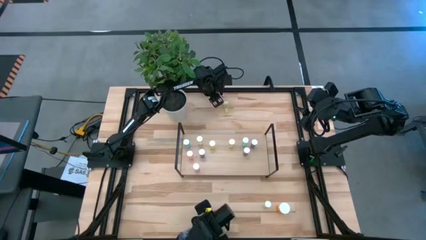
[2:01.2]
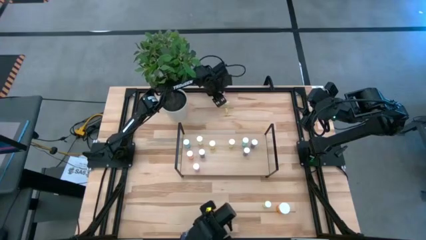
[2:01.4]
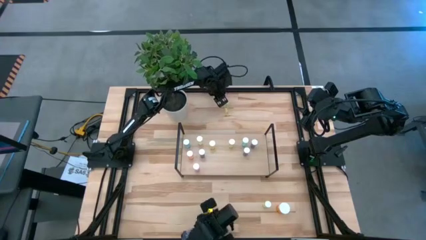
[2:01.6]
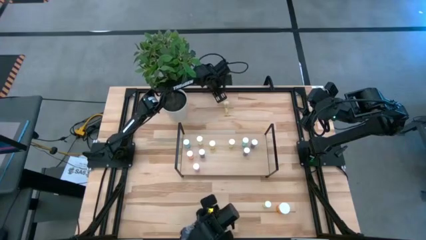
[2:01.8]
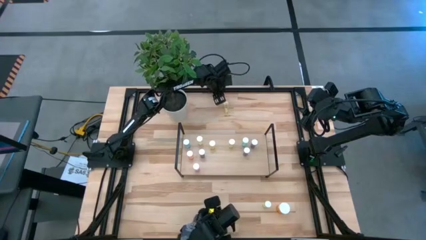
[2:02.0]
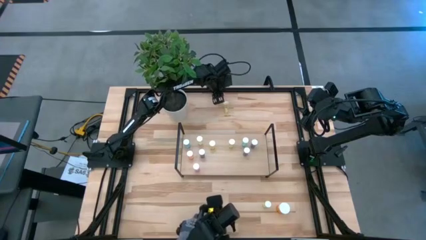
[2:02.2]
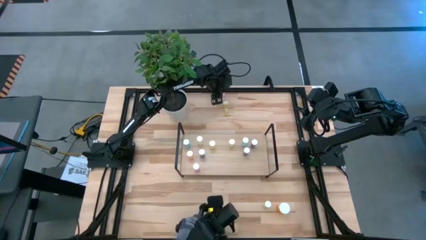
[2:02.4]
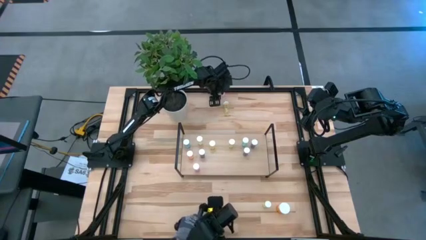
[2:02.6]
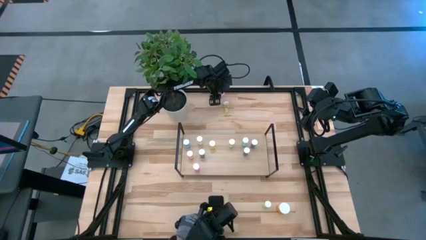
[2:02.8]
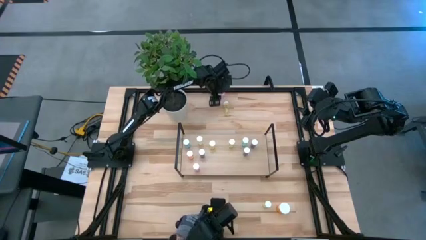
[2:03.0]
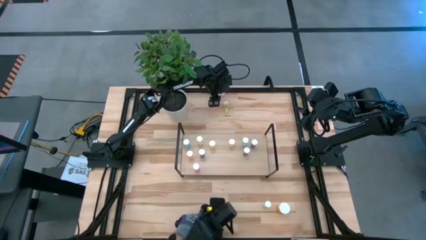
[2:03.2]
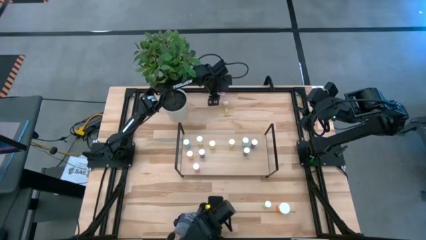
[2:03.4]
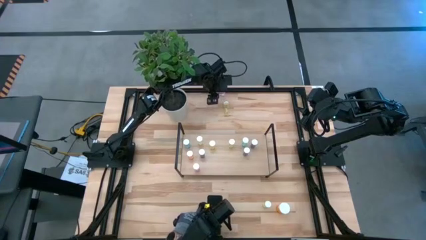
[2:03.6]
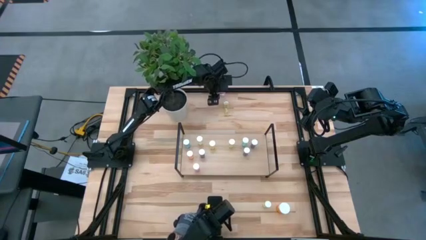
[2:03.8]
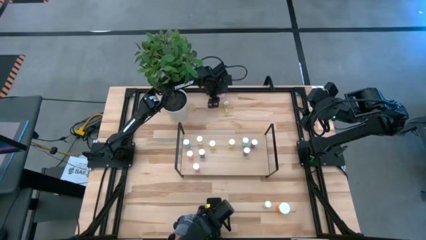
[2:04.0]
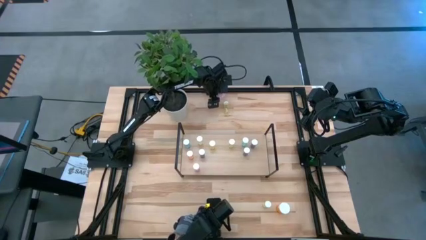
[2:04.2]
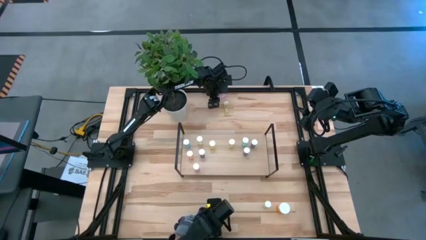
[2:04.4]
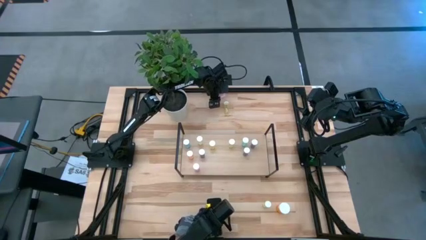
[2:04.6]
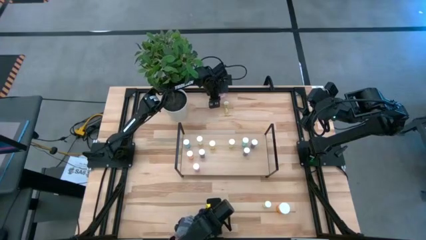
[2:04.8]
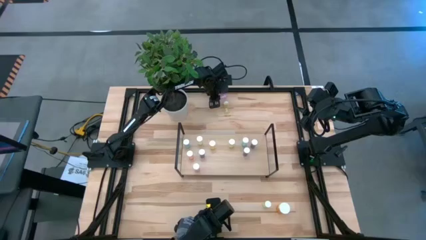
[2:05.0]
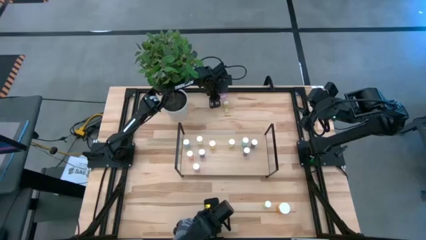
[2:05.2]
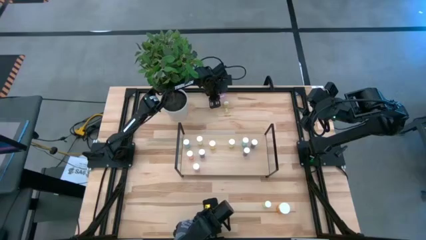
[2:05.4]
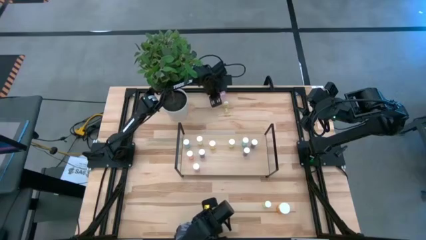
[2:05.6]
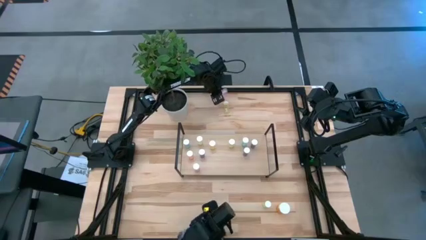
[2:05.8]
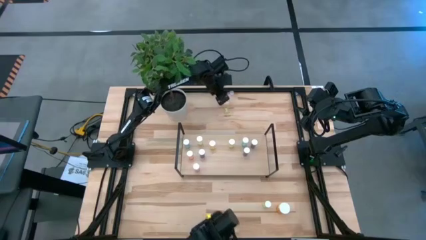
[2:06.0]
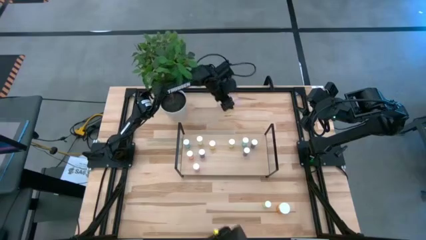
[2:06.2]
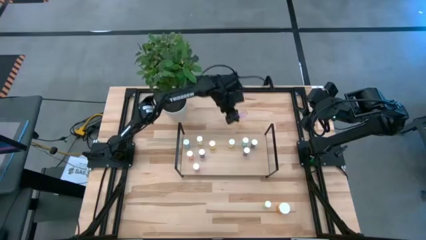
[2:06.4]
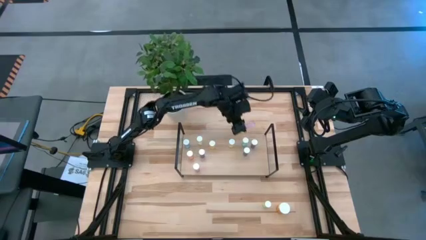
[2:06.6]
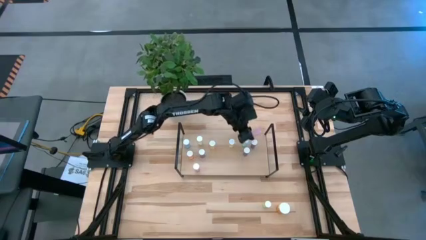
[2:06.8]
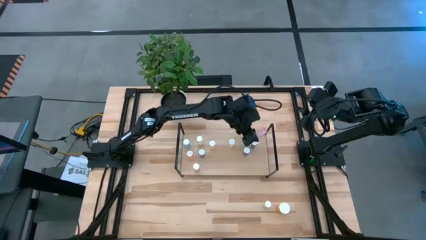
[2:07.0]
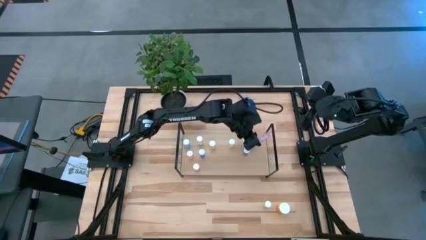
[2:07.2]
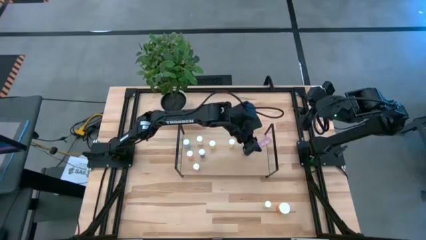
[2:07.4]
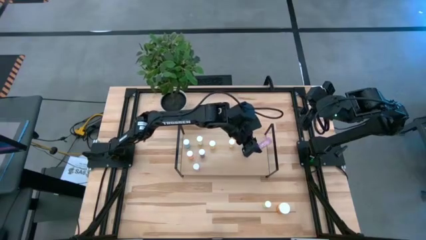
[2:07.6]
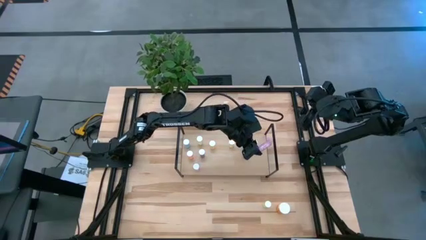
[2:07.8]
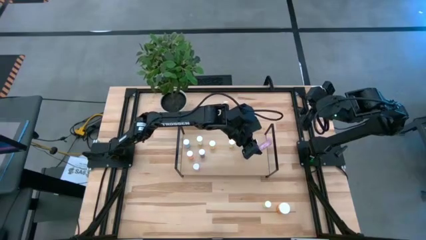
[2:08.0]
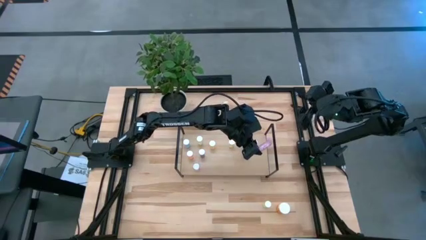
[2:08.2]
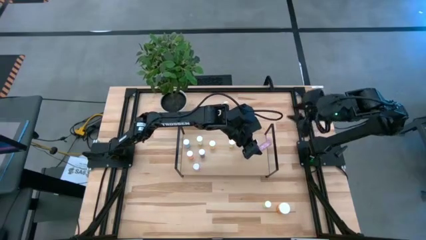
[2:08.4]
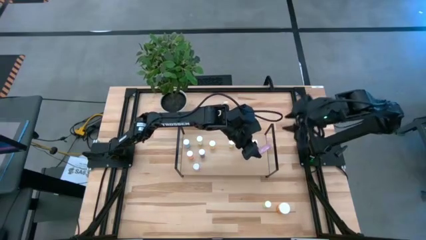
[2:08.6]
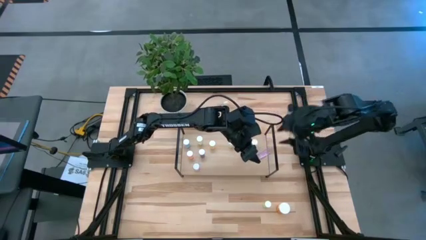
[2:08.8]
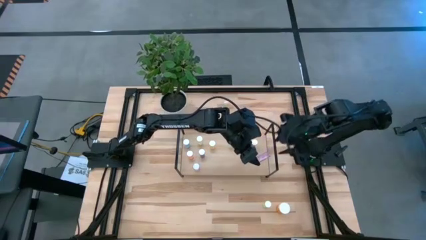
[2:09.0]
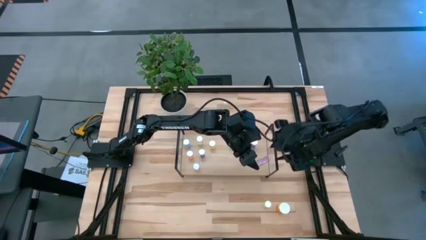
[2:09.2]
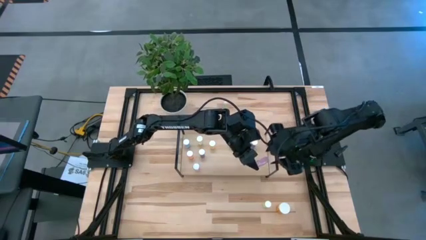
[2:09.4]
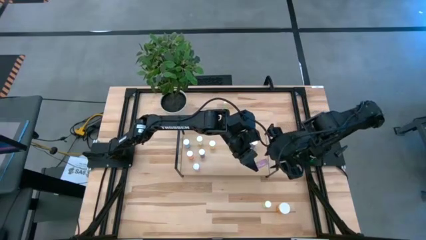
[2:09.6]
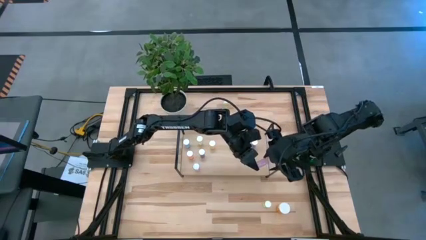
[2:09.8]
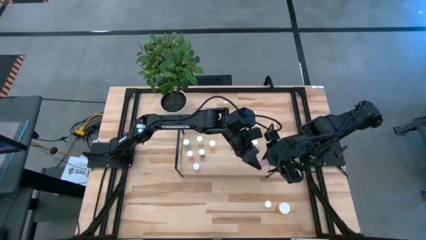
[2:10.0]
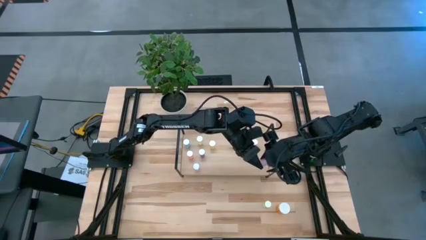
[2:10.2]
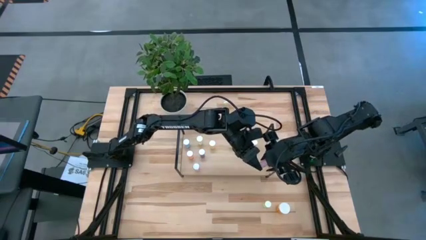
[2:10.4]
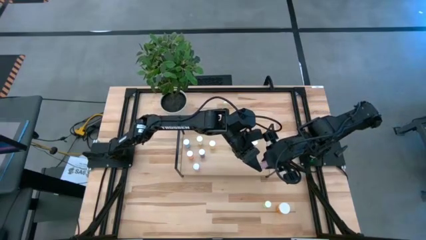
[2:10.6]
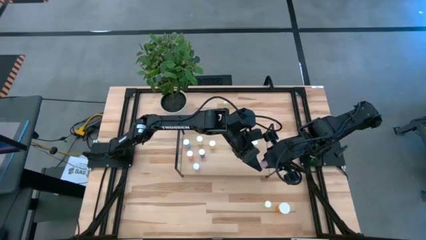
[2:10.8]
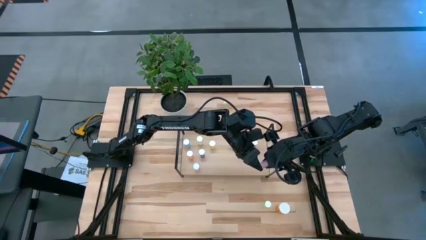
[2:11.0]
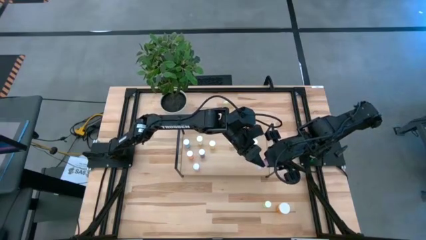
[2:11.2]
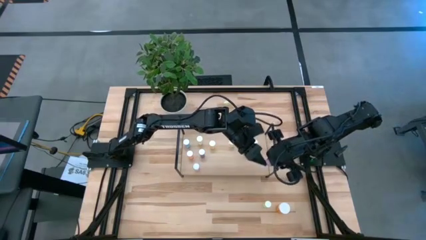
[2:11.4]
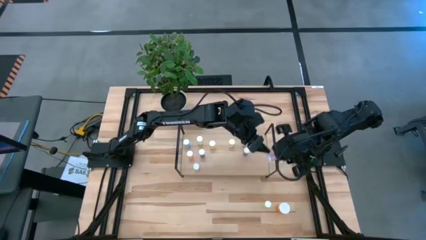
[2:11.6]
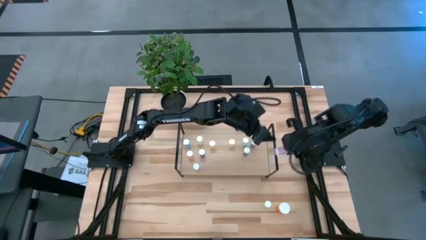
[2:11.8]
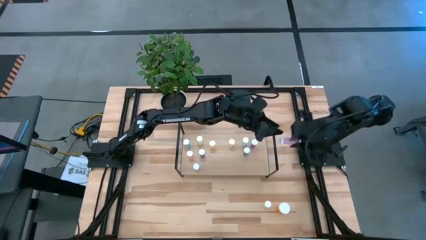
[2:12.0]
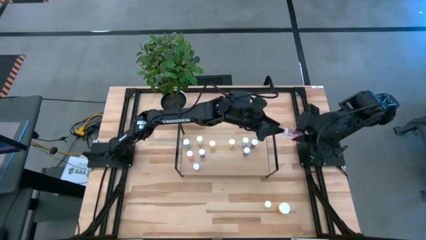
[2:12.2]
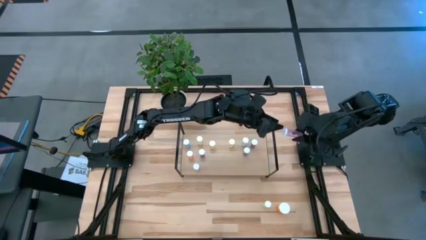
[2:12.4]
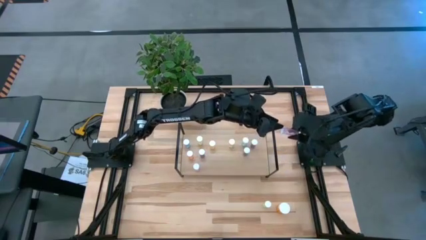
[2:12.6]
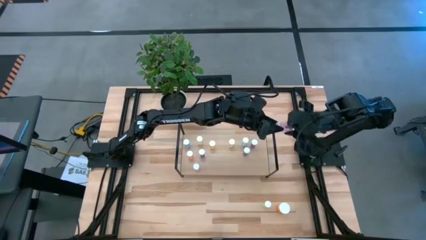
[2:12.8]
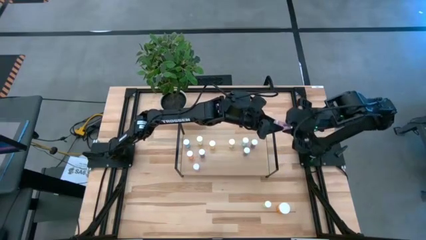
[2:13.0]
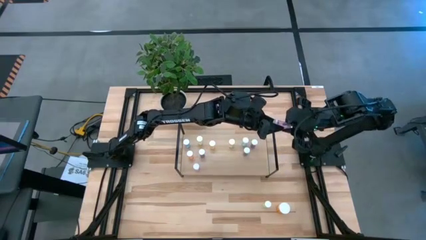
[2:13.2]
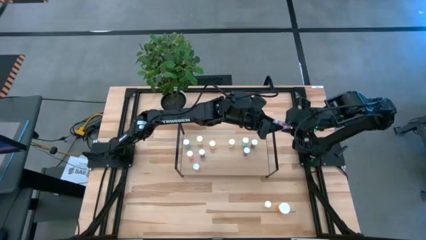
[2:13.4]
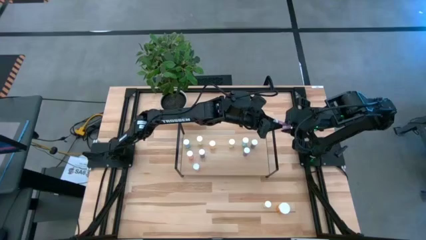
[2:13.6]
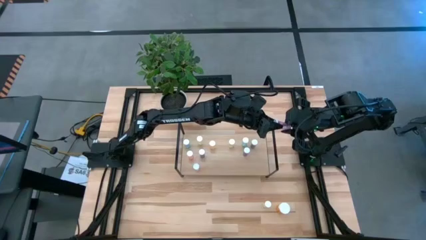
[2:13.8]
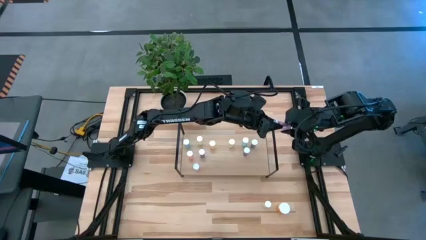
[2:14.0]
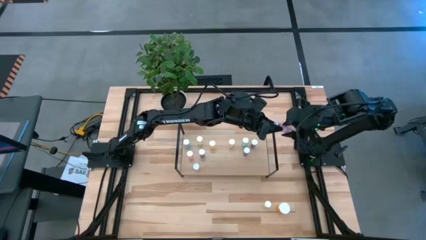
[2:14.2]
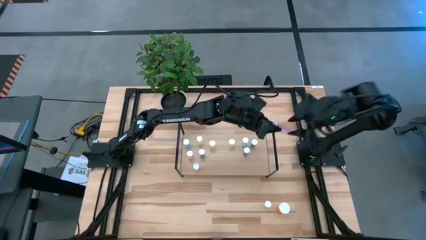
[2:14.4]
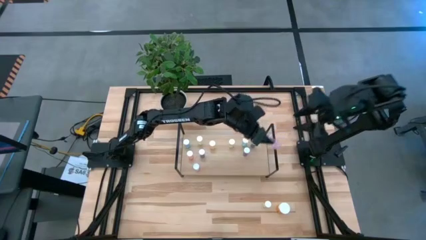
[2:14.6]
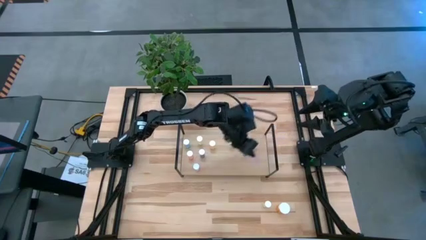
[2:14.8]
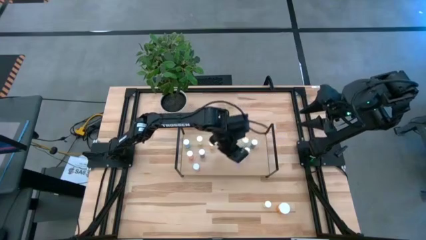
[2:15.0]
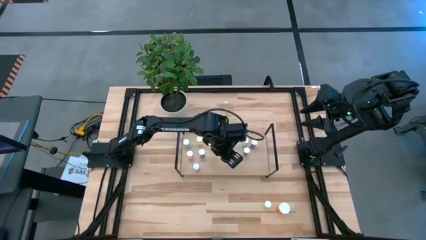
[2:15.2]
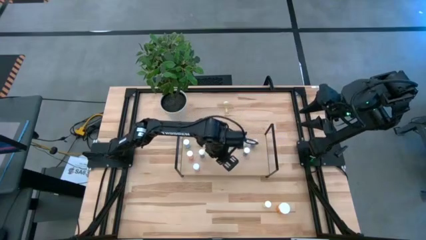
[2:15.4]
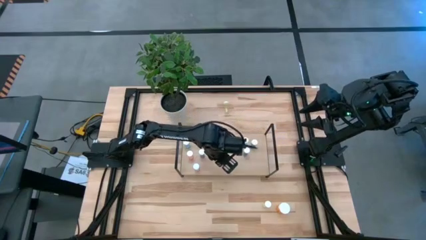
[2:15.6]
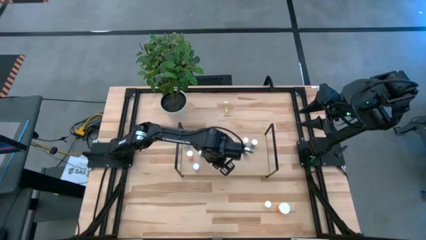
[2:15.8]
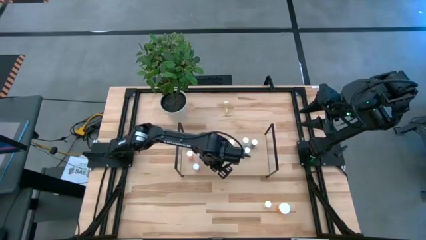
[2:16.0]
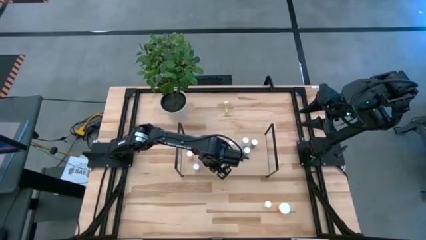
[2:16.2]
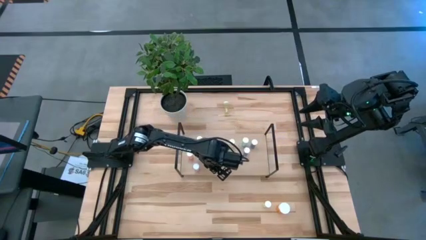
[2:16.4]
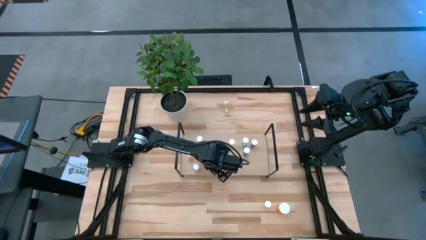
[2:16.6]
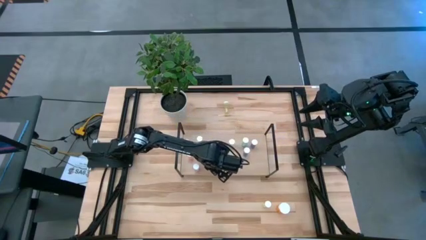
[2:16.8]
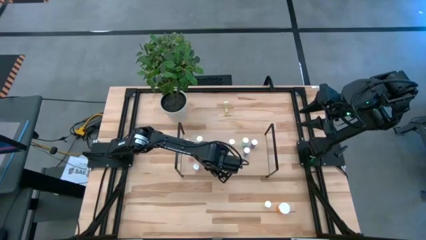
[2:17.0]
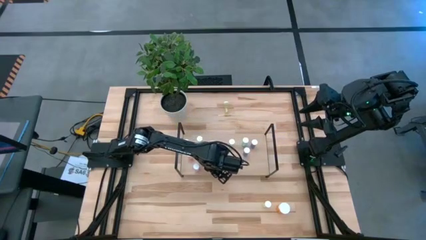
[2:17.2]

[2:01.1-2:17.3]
Task: Pick and place medicine bottles onto shelf by color
Put the pink pill bottle on the shelf
